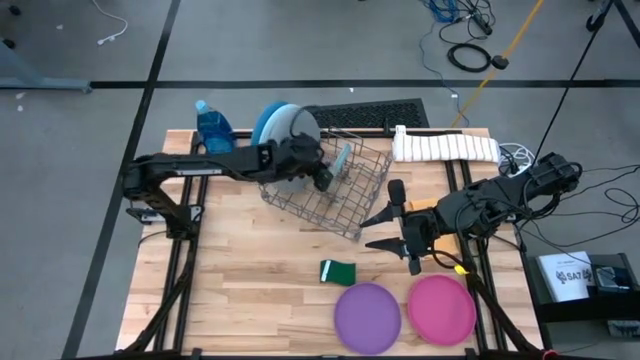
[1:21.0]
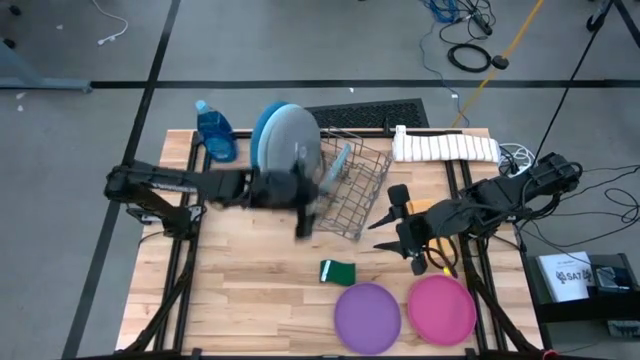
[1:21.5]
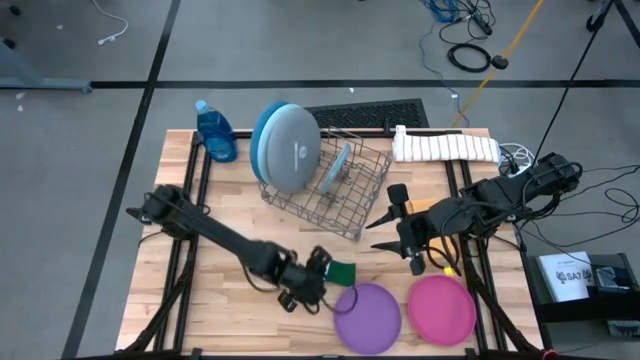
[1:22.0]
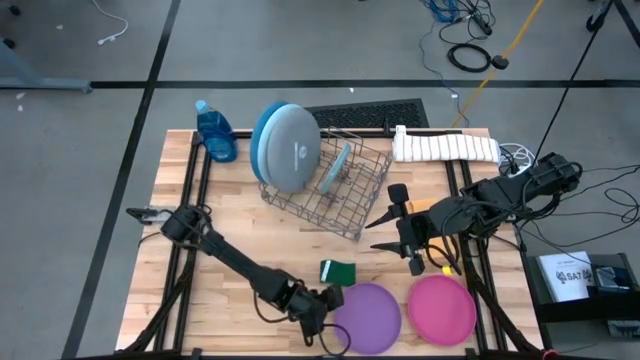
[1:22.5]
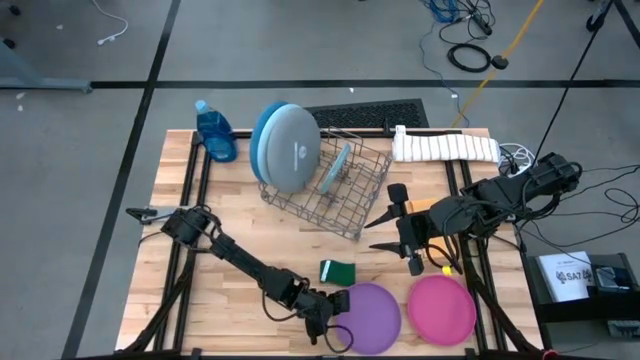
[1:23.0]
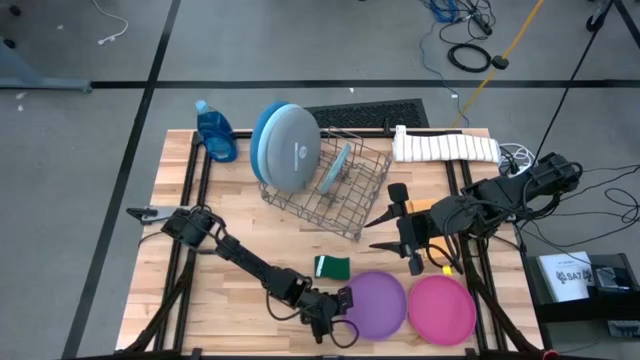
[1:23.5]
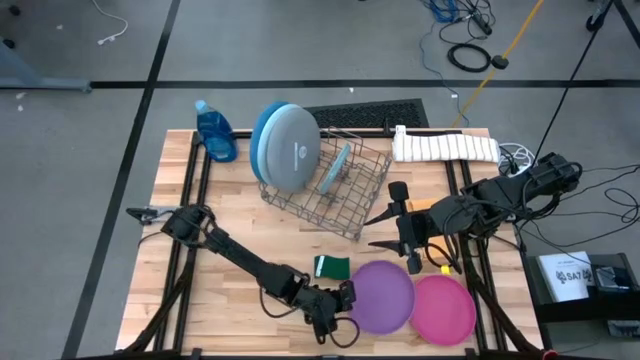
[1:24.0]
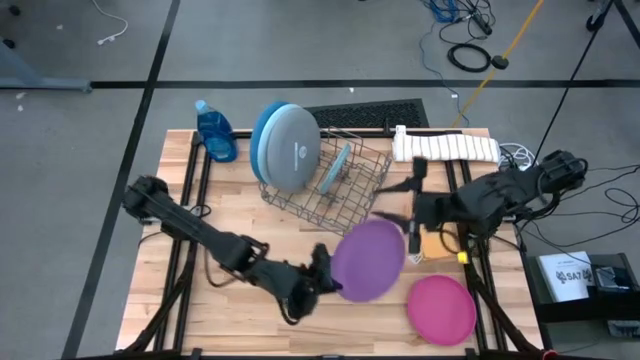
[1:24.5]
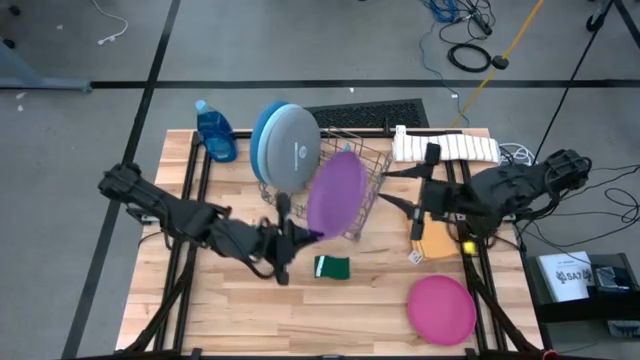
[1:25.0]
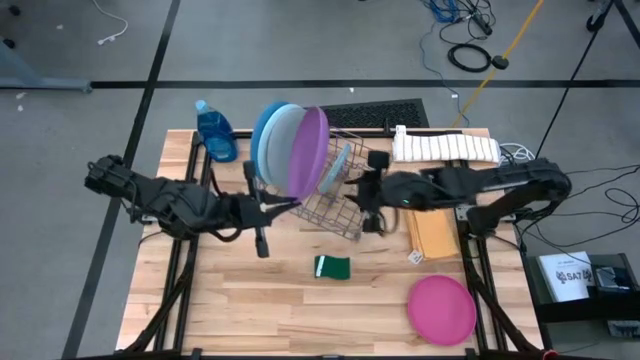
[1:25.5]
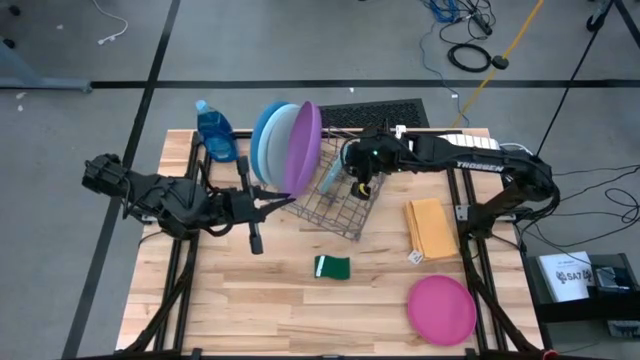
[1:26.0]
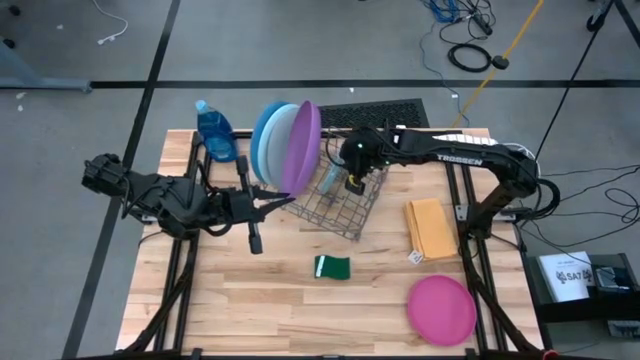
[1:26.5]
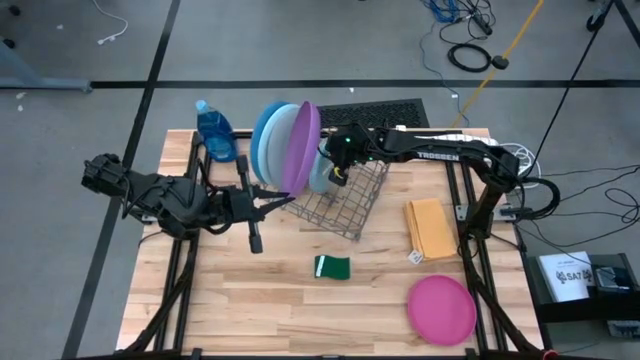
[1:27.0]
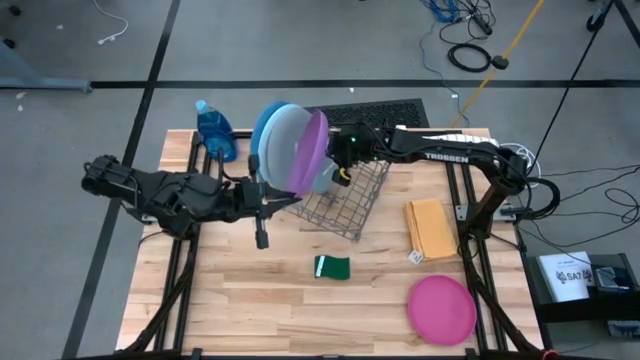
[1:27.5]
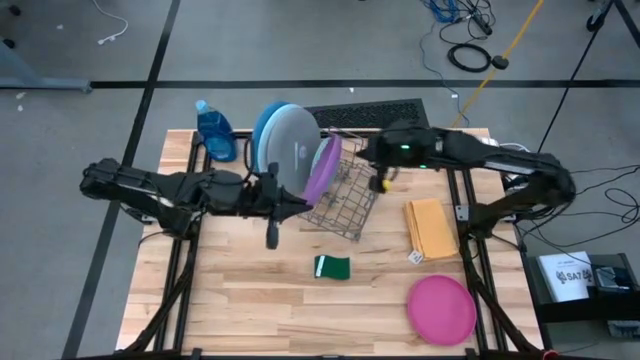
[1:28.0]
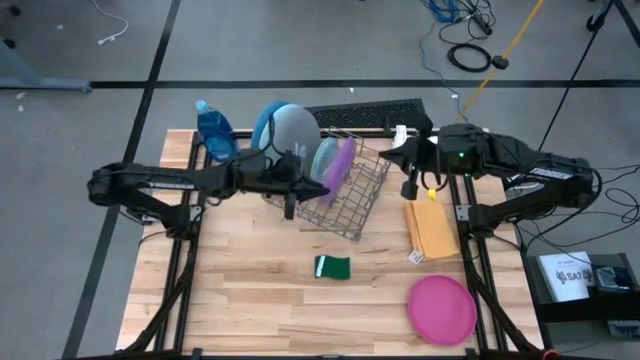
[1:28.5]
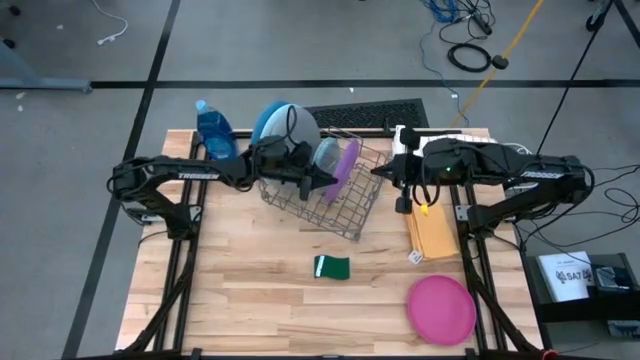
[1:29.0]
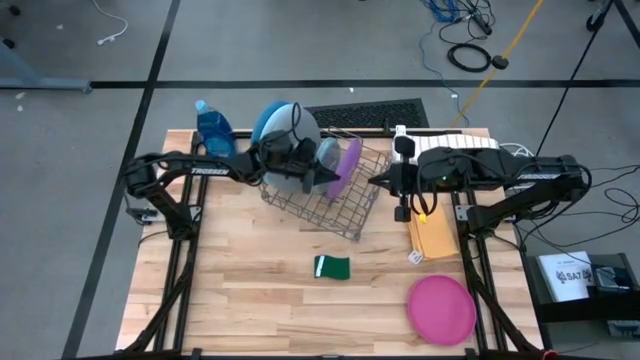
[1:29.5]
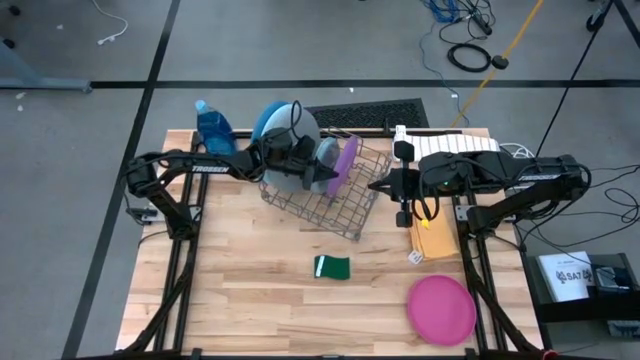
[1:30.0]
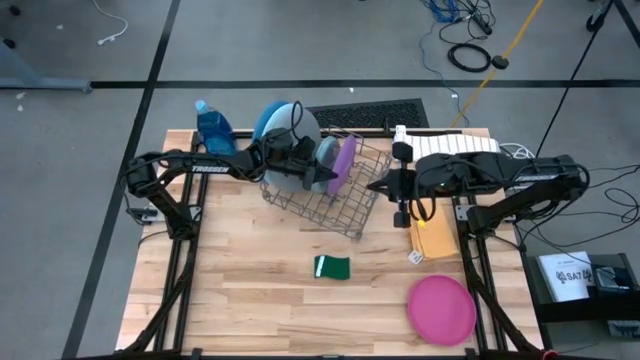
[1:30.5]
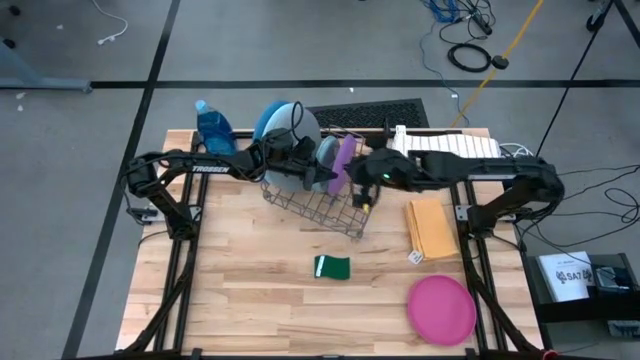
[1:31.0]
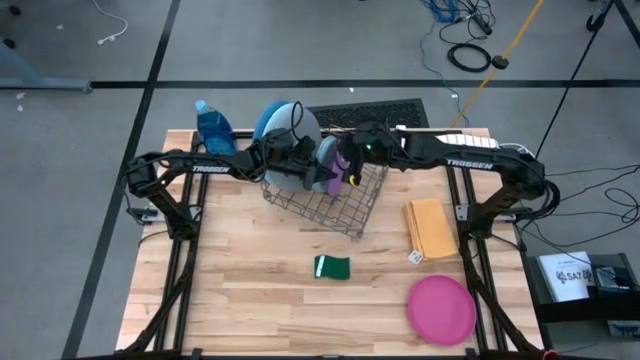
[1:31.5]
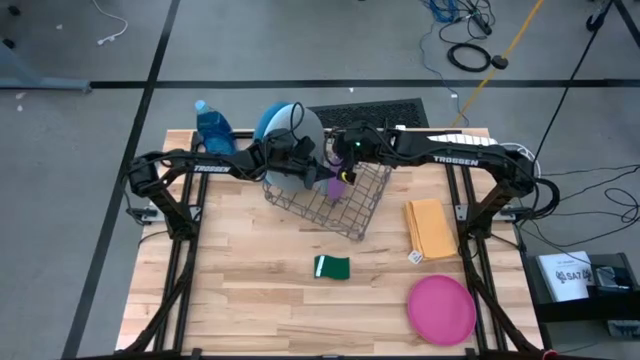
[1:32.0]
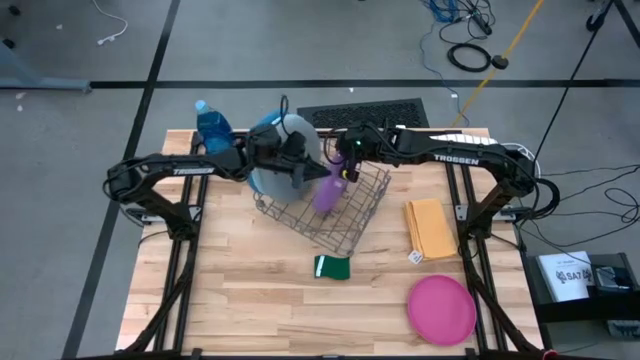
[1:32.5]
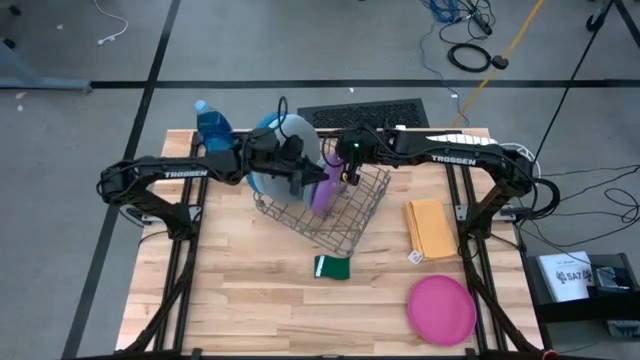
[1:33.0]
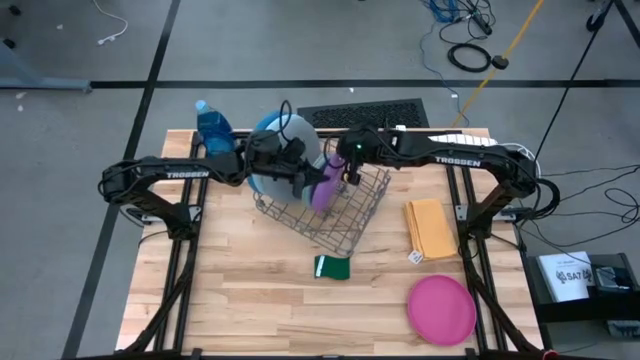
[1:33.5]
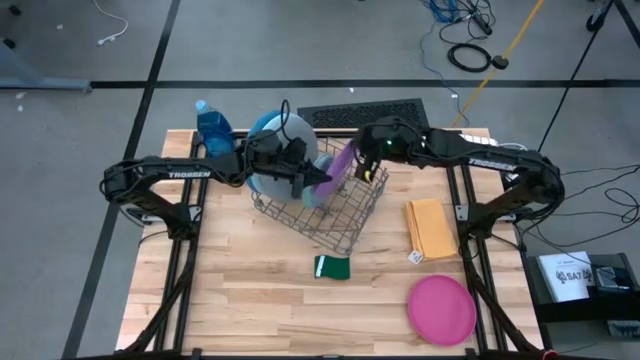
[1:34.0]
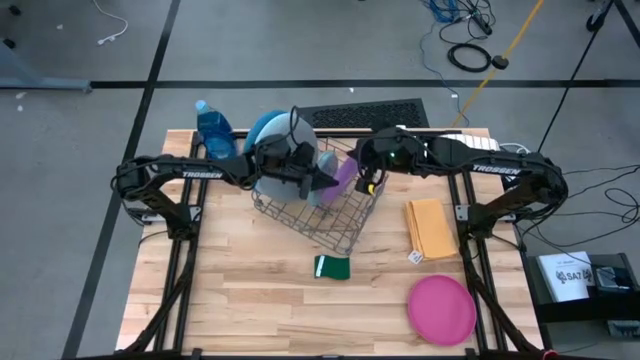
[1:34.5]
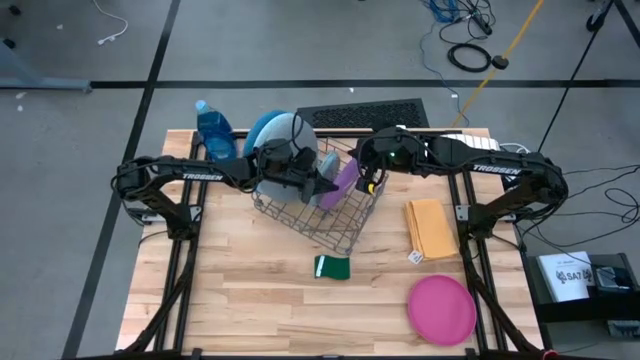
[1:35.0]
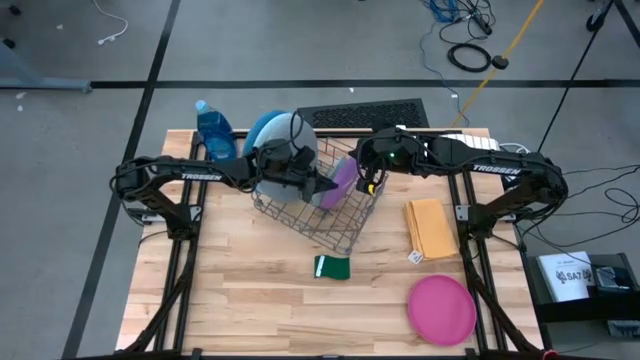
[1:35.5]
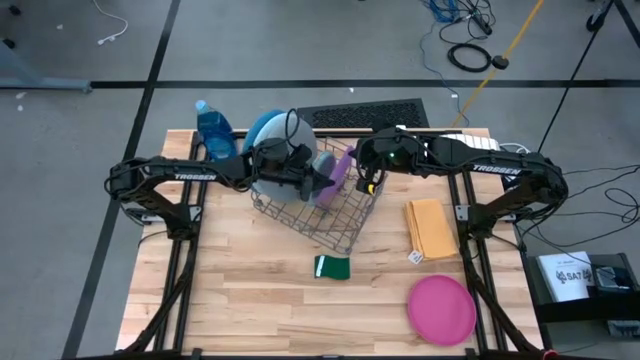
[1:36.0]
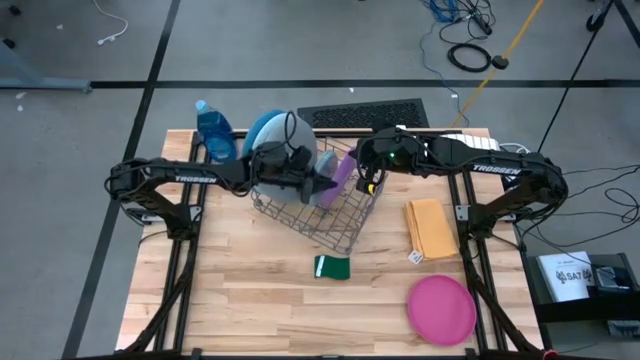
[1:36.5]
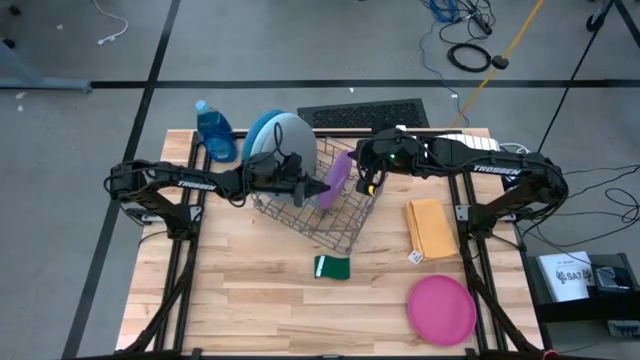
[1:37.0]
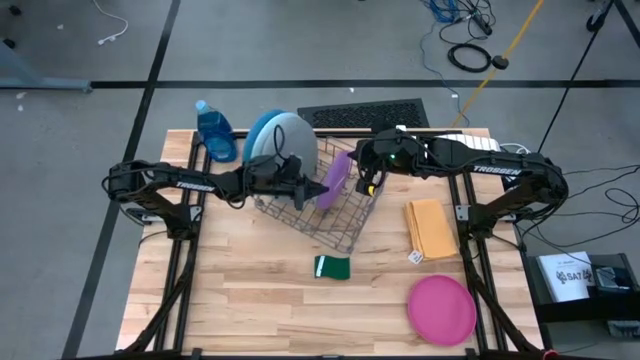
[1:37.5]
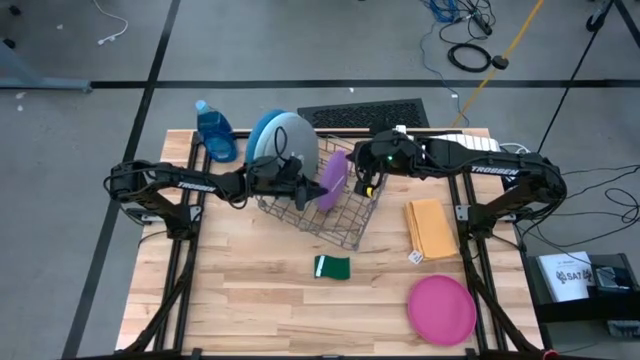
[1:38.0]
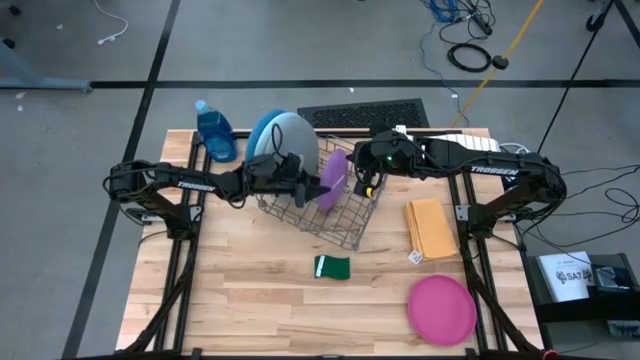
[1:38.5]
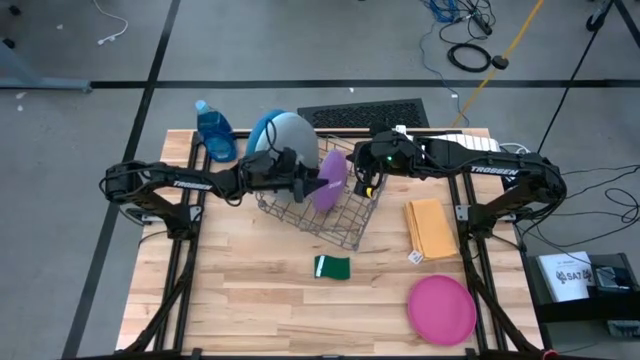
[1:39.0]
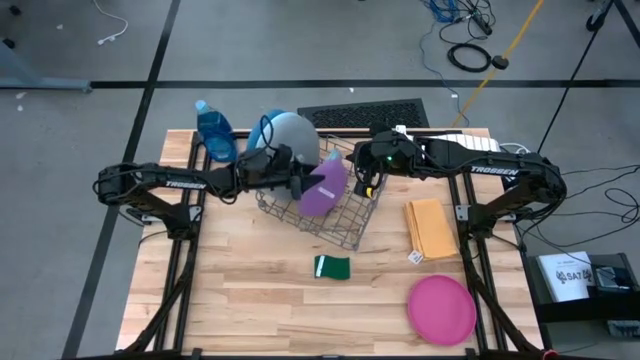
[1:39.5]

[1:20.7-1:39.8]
Task: Sort dishes
Put the purple plate in the dish rack

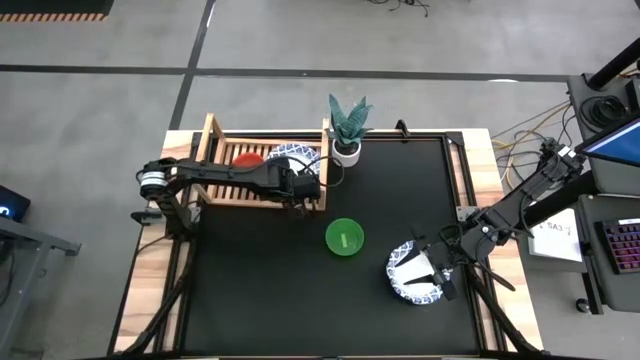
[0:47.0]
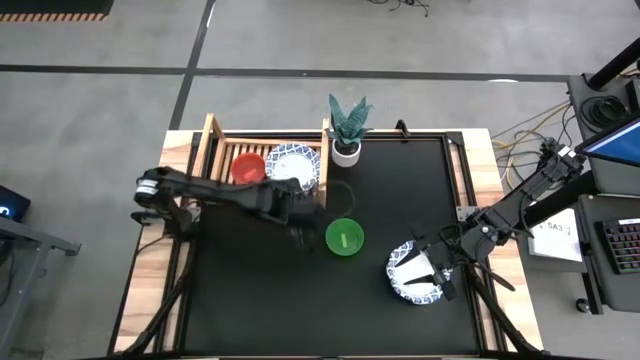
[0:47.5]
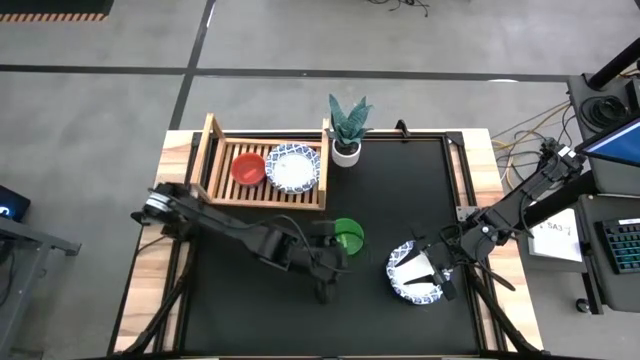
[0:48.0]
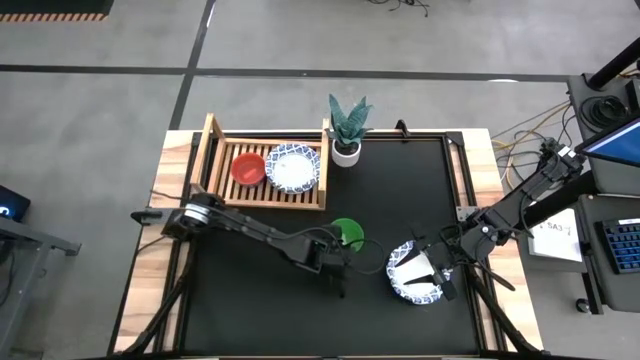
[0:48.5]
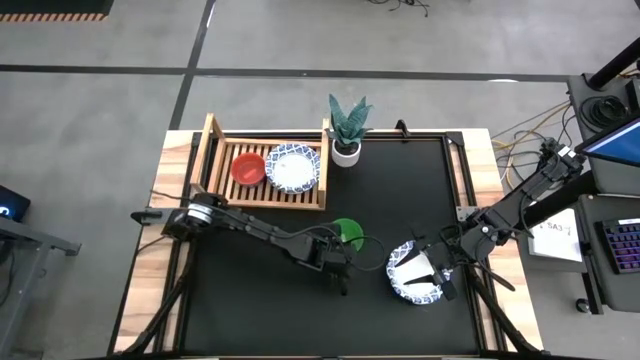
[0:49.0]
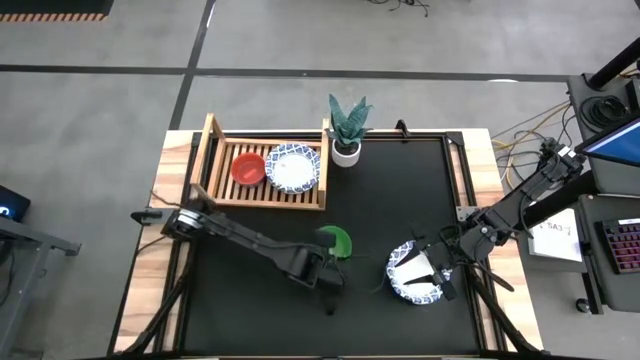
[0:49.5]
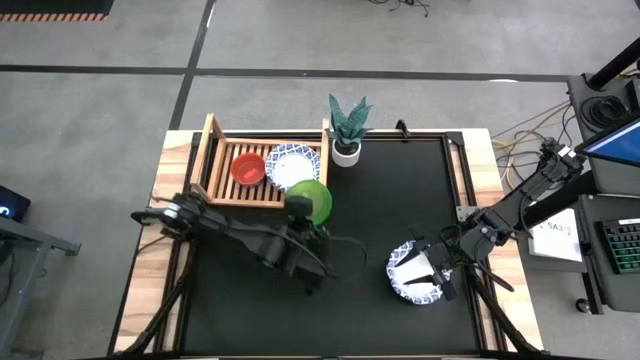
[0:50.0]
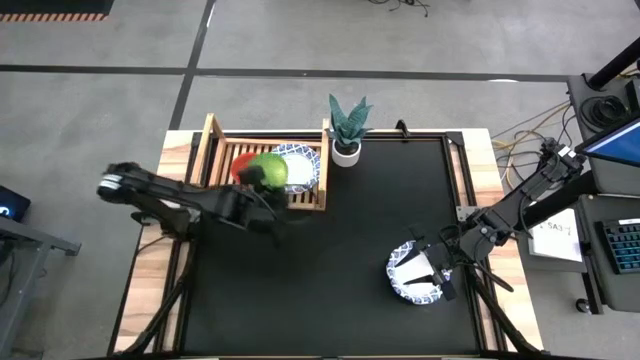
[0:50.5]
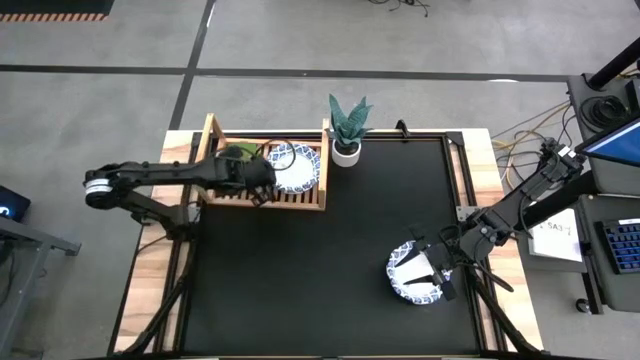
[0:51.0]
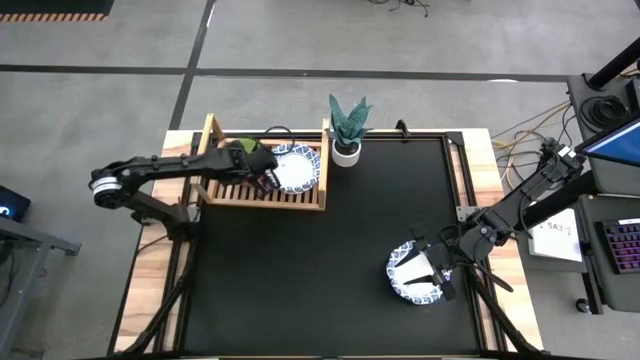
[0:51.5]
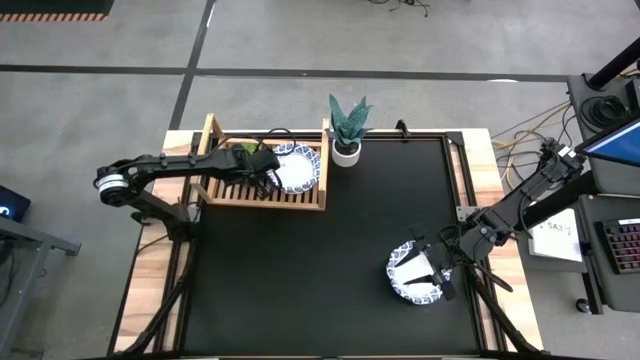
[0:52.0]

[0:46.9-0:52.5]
Task: Place and stack bowls onto a shelf
Stack the green bowl on top of the orange bowl on the shelf
